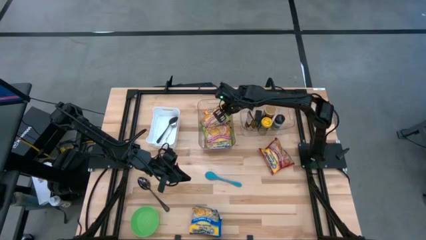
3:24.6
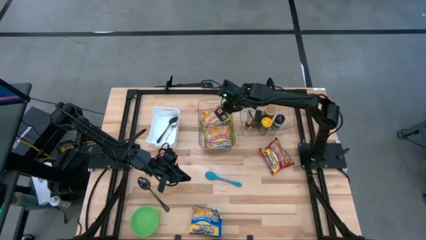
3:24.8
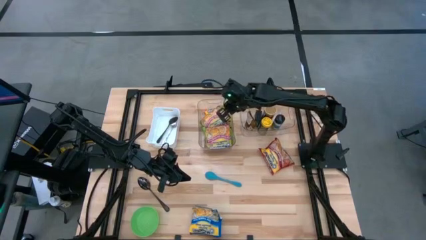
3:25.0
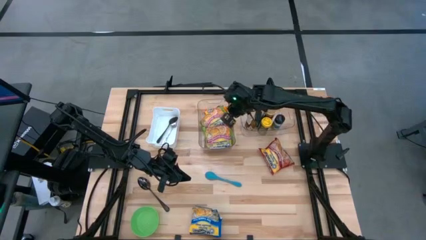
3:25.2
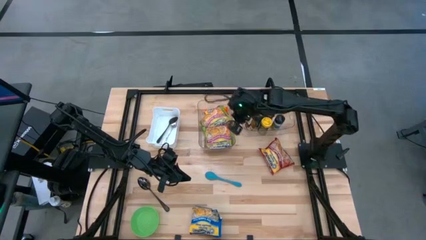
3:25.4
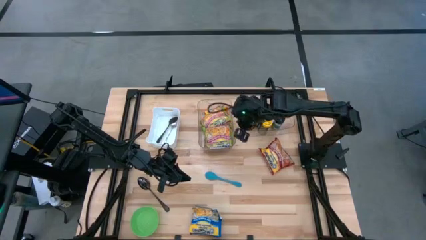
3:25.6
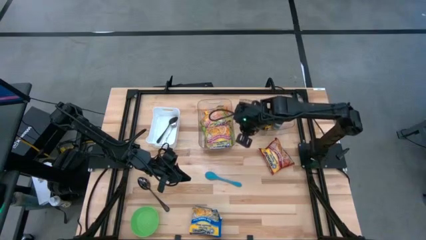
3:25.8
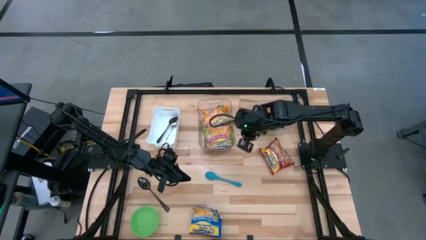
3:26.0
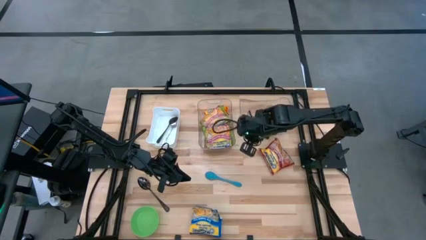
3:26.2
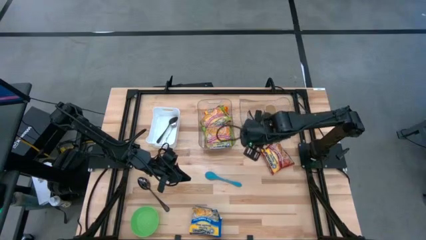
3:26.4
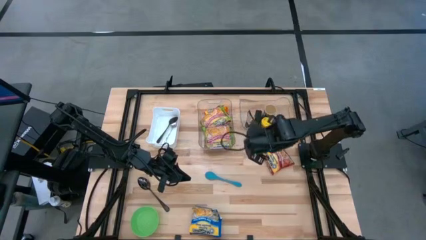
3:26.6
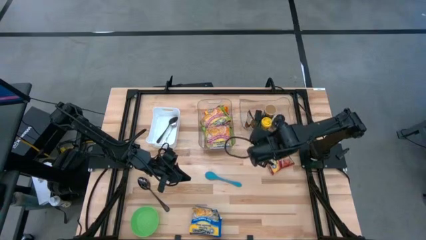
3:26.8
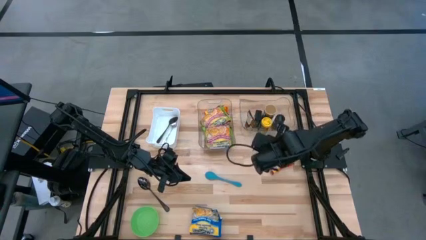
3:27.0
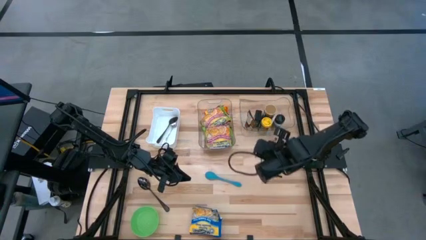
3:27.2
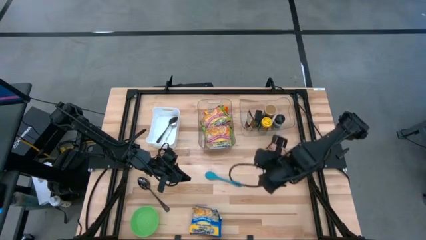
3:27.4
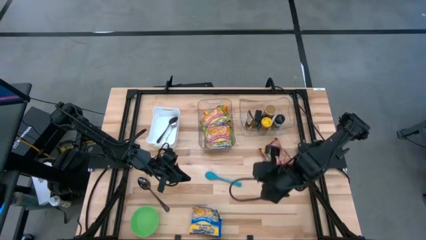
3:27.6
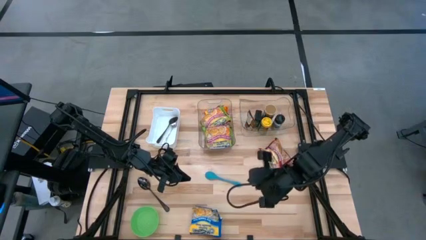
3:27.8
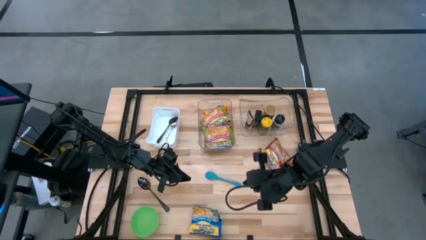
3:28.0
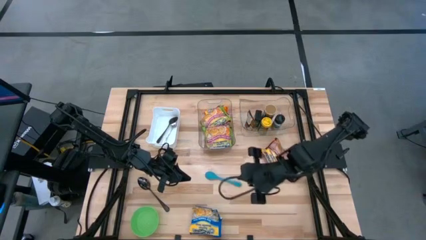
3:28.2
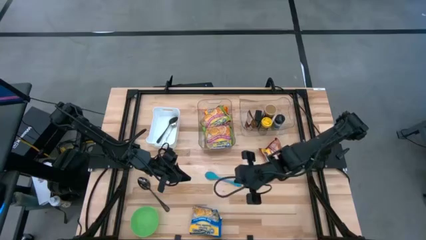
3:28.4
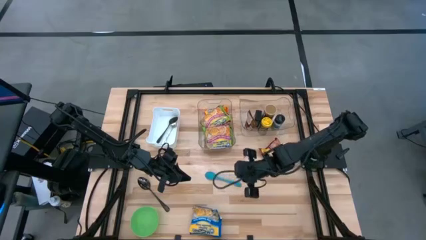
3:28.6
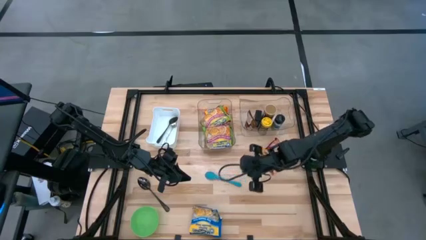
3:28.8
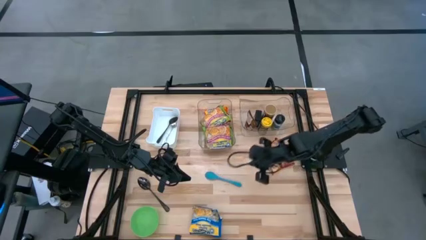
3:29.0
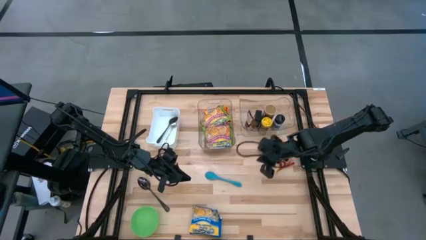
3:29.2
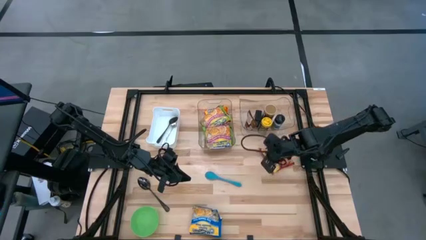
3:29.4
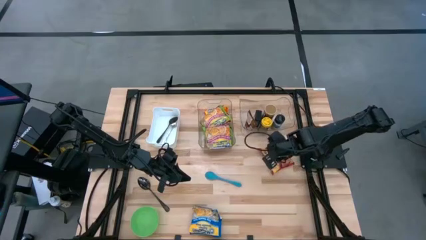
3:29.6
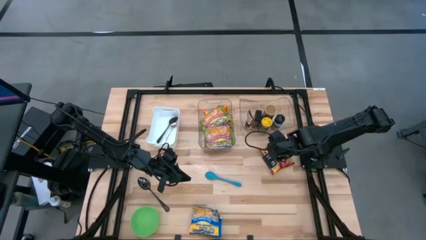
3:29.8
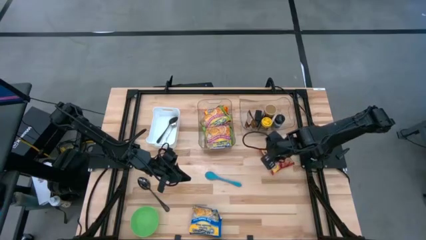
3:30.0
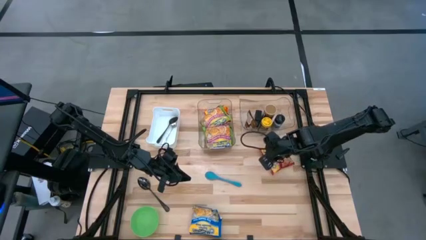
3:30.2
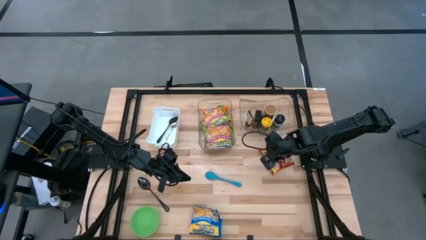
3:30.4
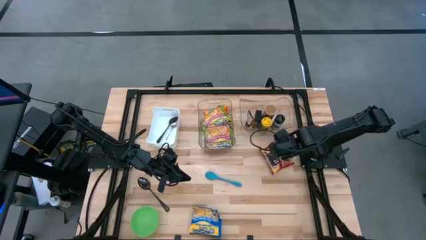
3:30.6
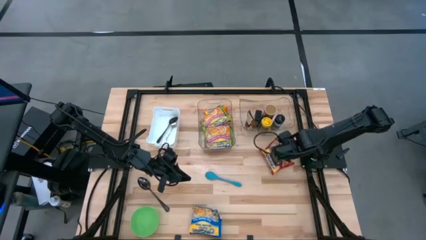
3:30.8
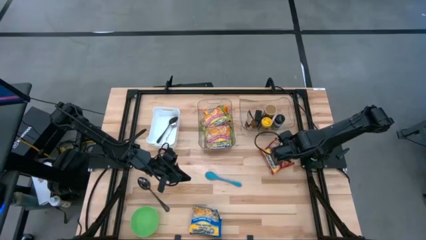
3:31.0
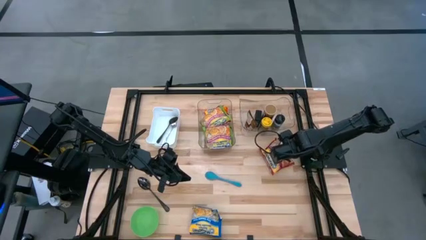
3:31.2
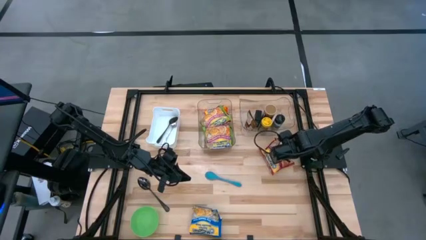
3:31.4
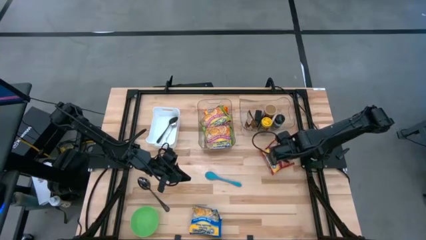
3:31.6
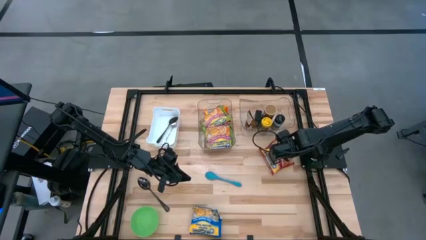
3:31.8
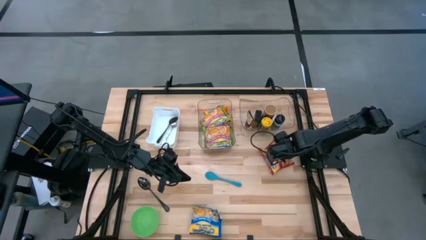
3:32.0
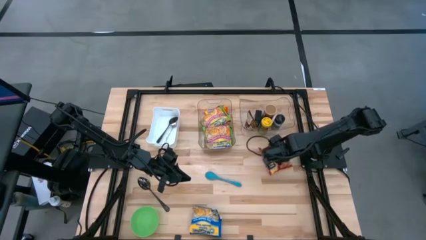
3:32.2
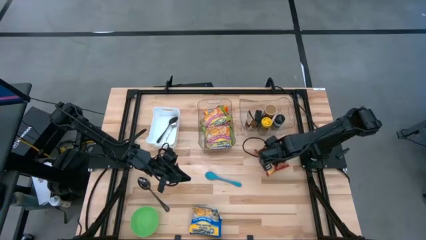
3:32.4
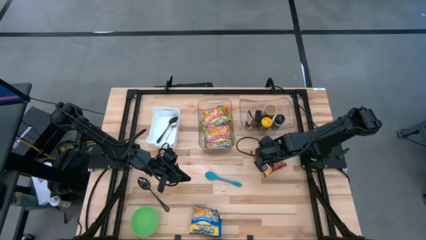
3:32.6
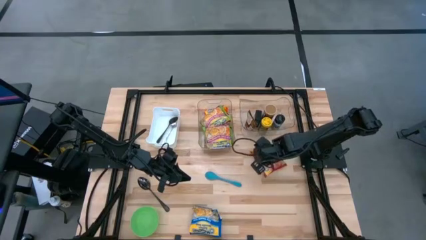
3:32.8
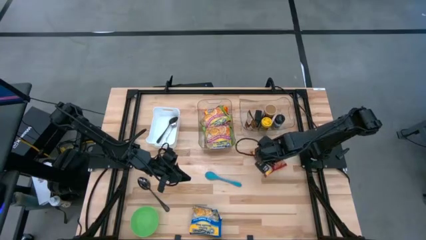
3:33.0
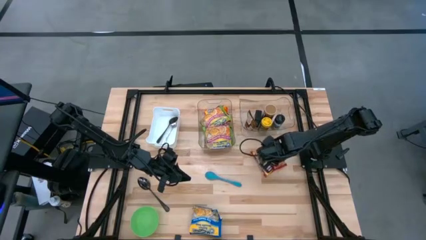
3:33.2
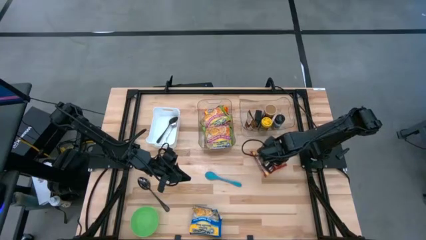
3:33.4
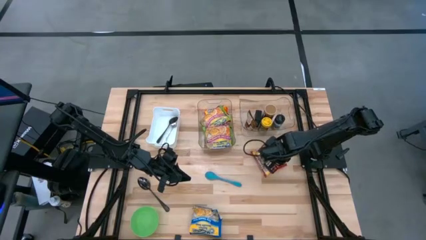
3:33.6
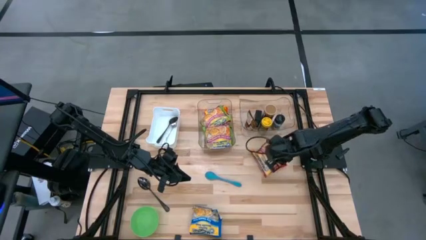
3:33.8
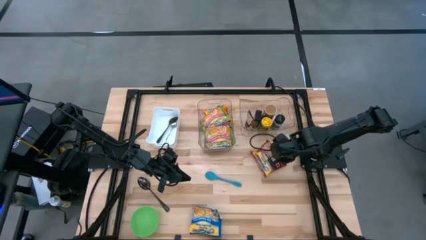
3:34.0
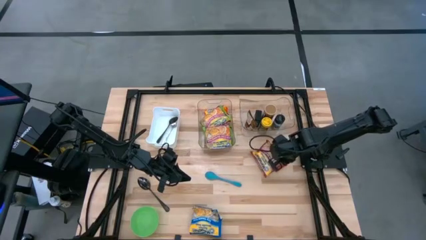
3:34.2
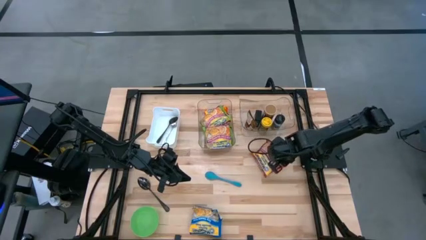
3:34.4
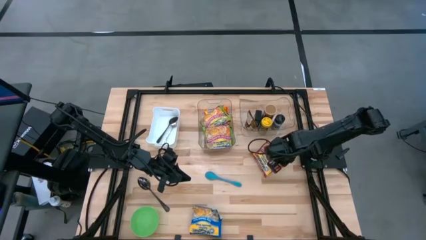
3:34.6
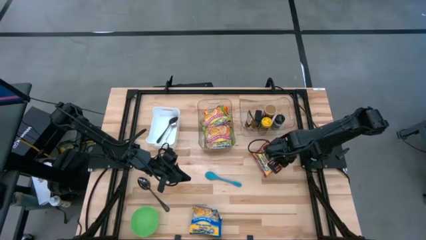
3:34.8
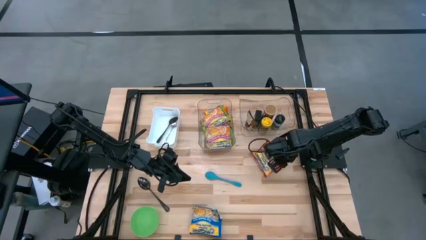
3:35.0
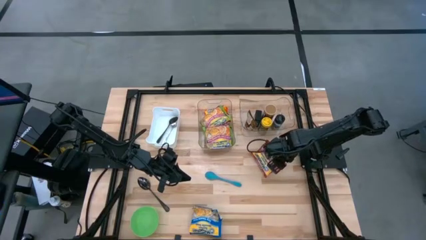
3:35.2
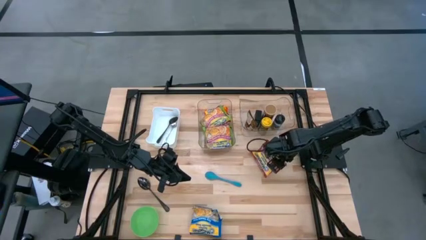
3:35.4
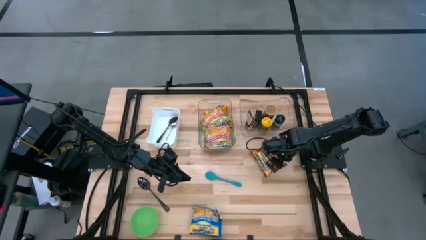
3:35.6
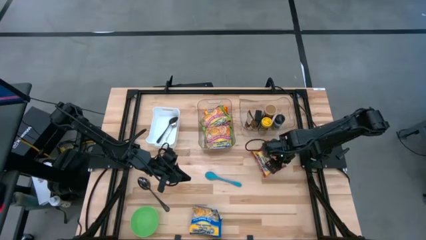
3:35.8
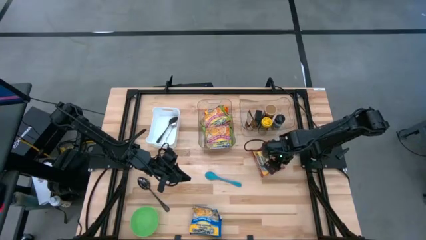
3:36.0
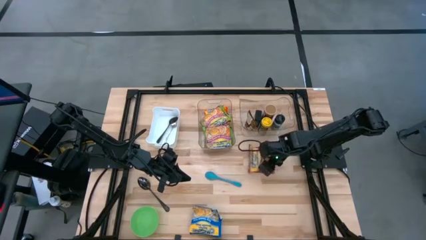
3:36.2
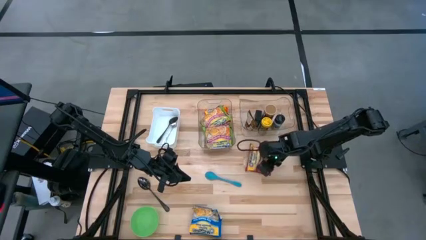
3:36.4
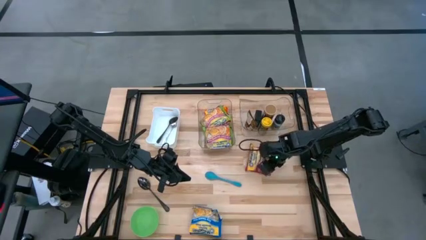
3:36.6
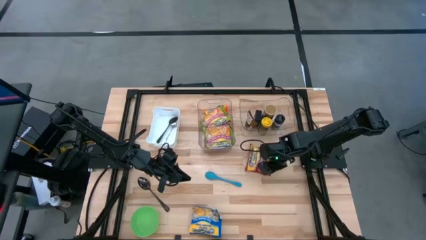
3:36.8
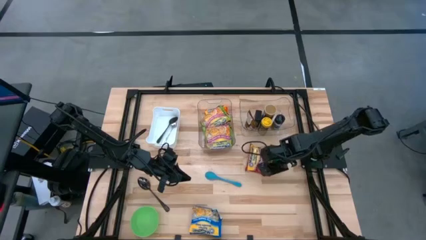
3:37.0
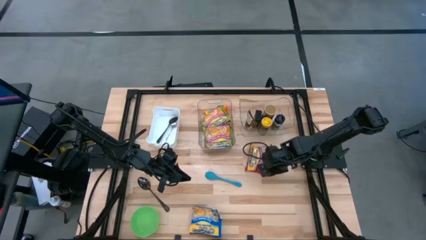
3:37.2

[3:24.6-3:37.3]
Task: Pick & Place Food Item
Put the red noodle pack into the left transparent bin

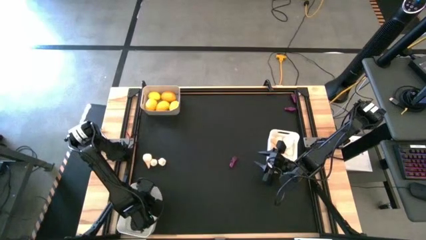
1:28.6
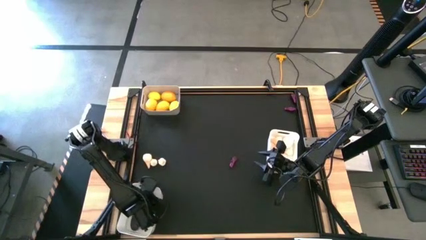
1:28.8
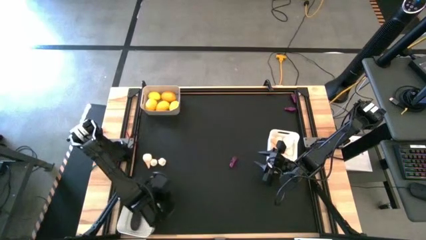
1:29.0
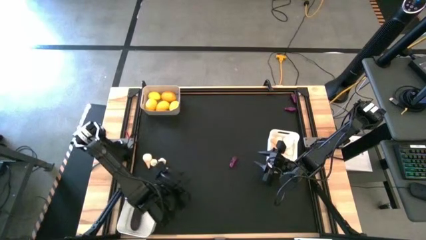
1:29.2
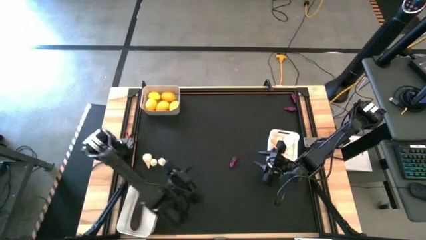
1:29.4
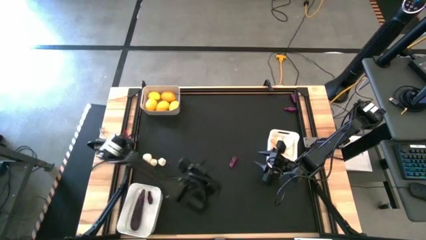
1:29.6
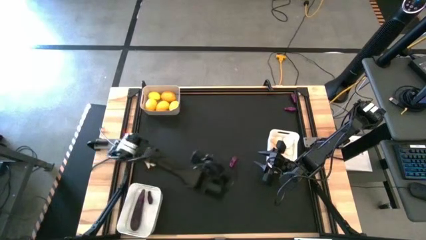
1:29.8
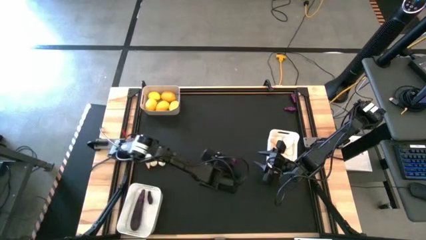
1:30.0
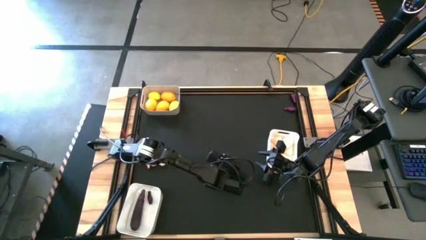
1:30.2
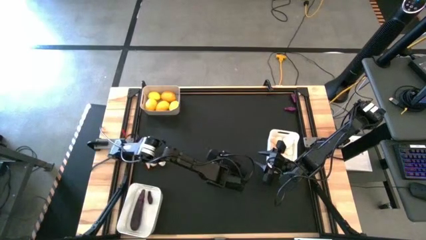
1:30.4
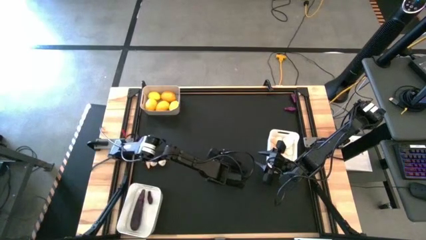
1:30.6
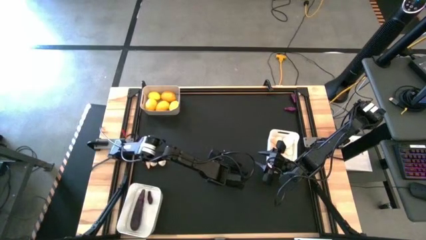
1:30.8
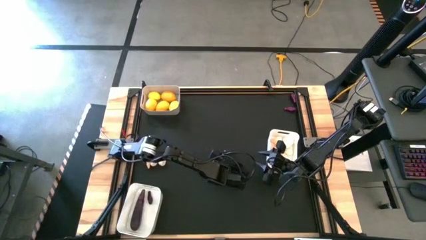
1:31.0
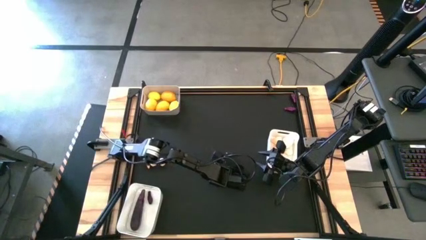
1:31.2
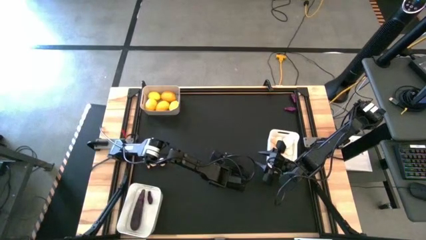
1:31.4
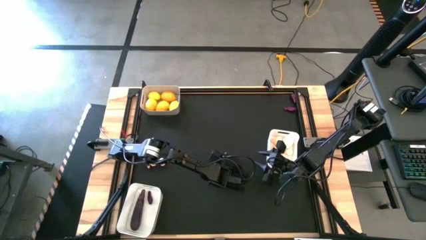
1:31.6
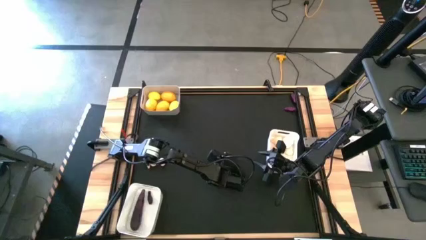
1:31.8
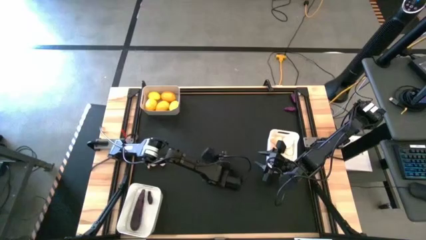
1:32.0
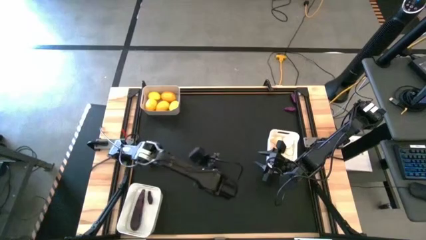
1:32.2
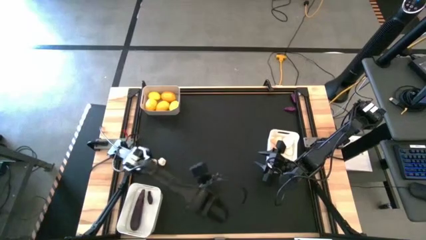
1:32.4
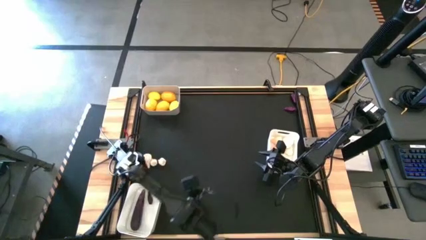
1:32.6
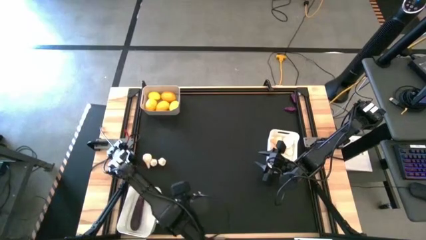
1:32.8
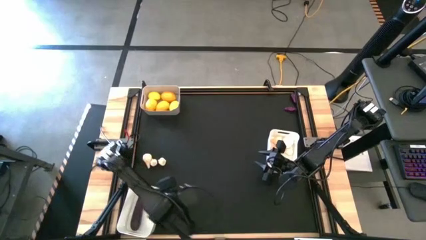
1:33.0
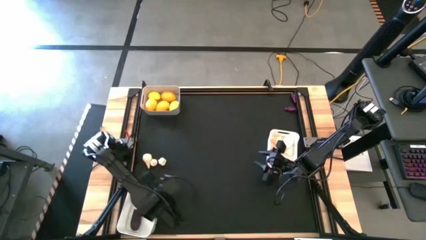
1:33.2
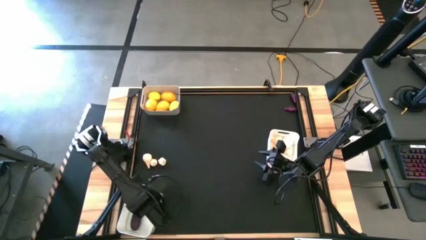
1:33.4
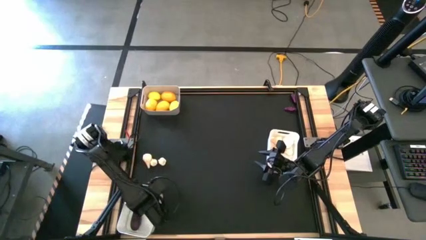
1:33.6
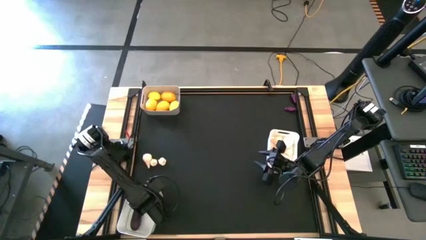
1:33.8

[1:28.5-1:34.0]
Task: Sort produce into baskets
Put the bottom left eggplant into the bottom left white bin
